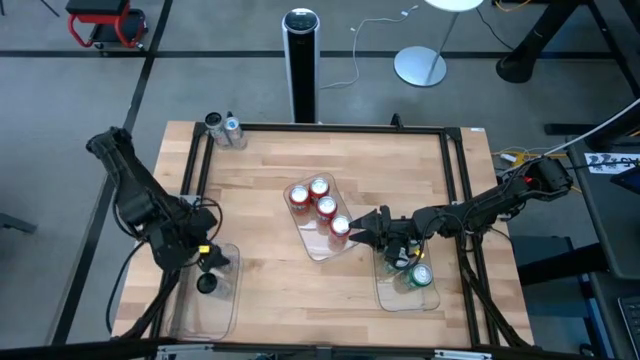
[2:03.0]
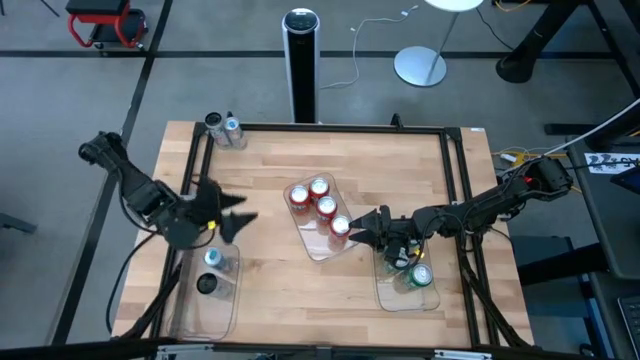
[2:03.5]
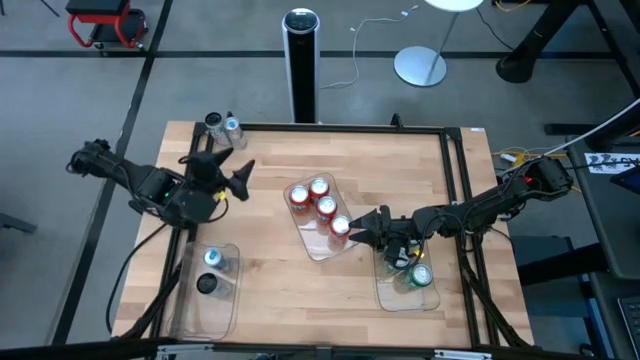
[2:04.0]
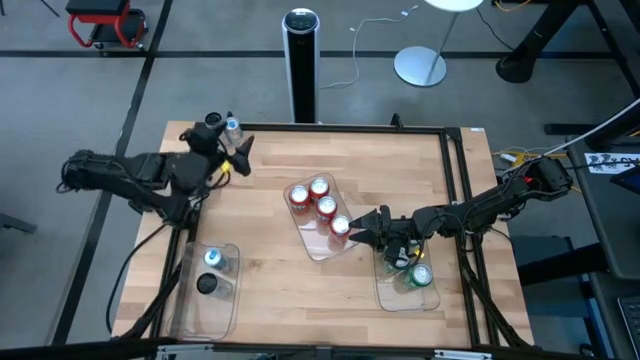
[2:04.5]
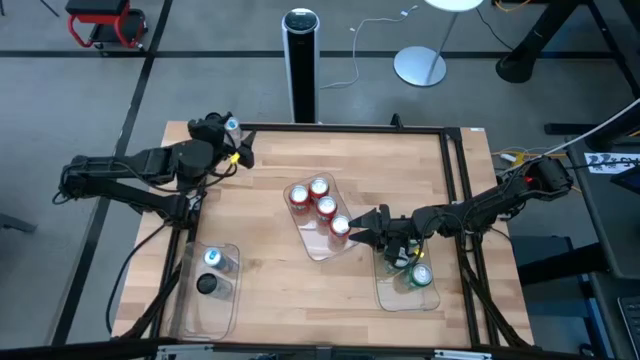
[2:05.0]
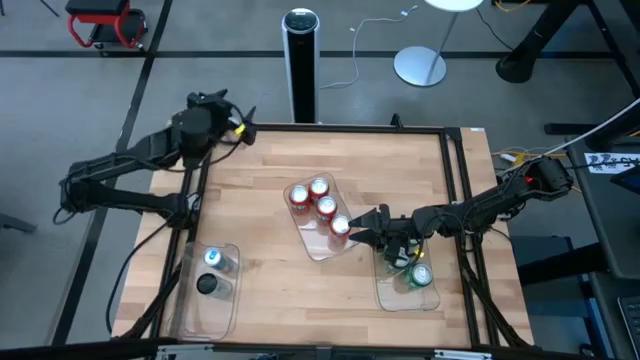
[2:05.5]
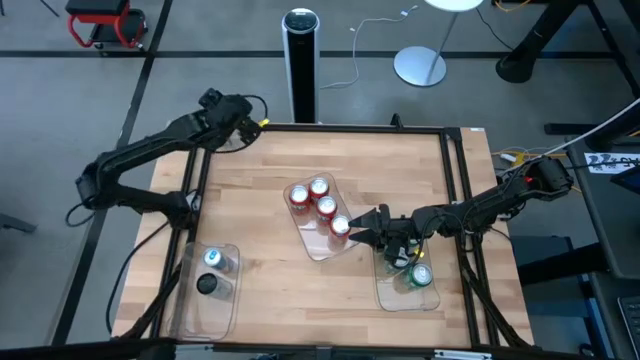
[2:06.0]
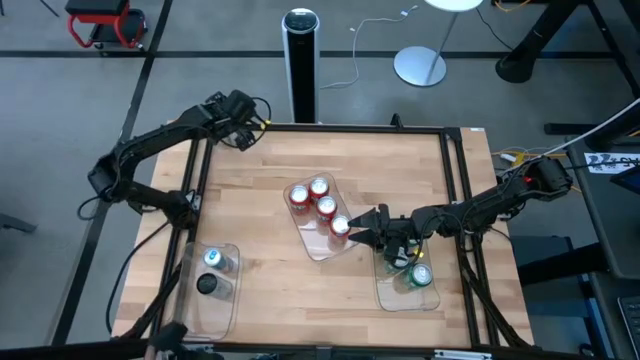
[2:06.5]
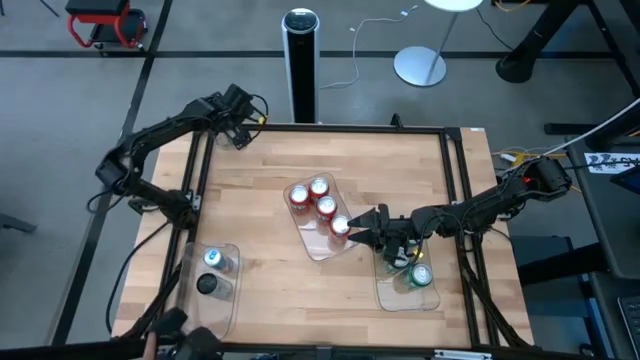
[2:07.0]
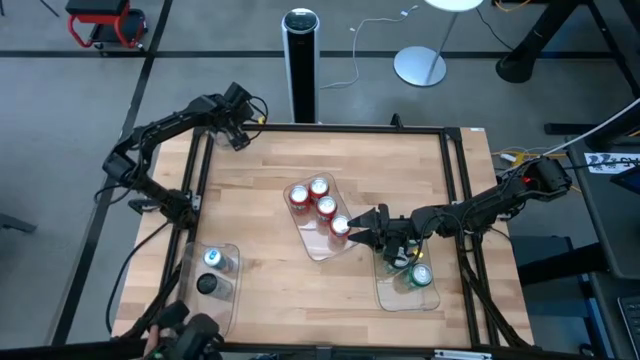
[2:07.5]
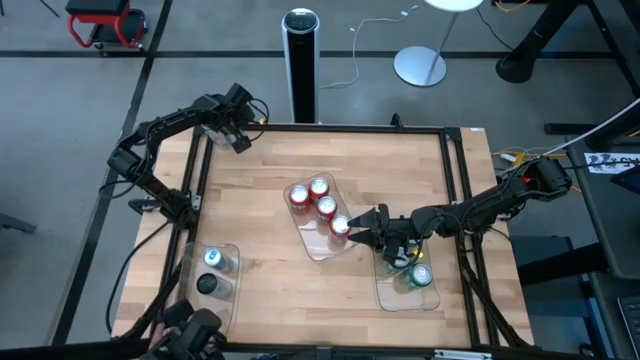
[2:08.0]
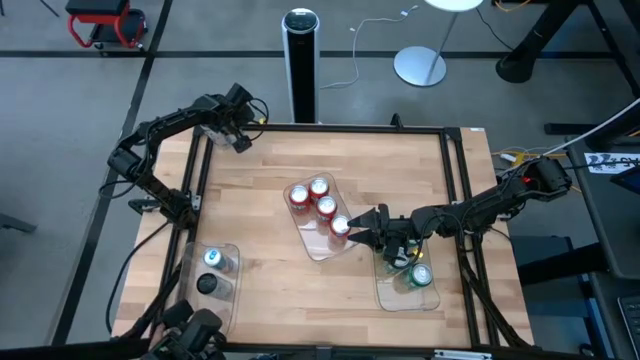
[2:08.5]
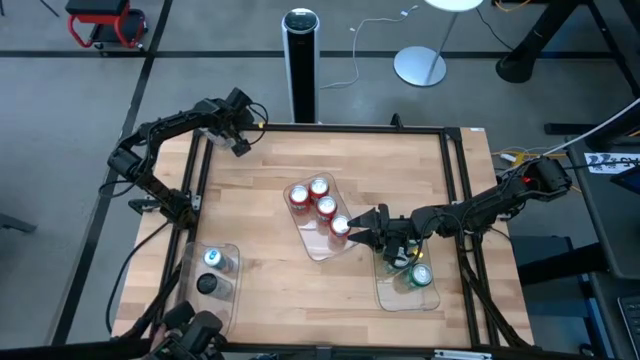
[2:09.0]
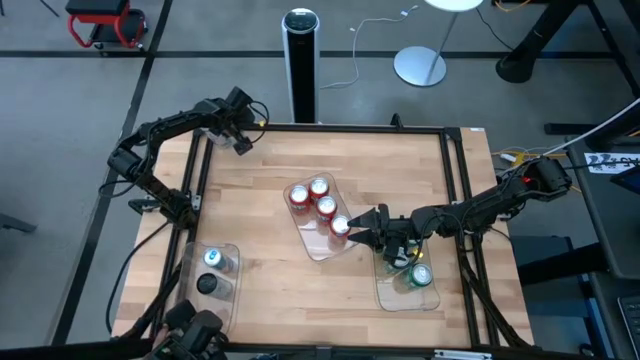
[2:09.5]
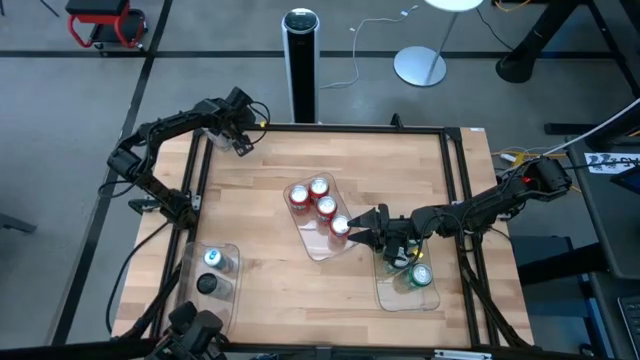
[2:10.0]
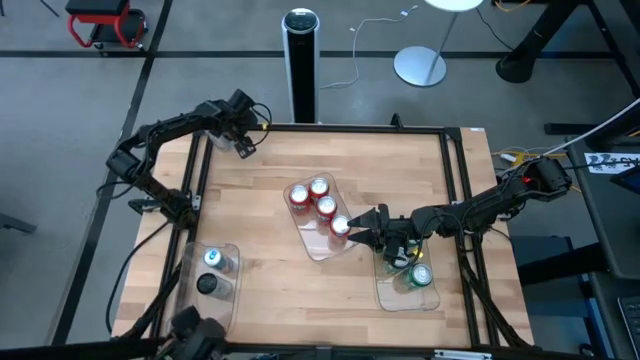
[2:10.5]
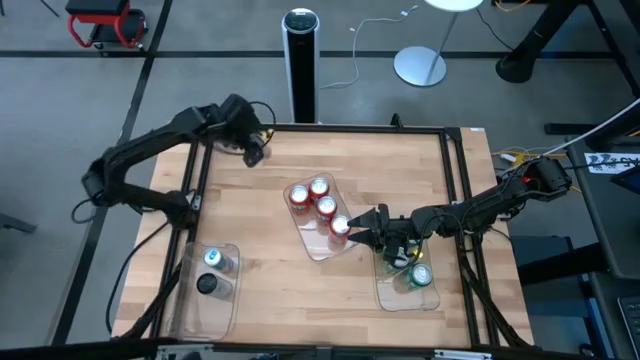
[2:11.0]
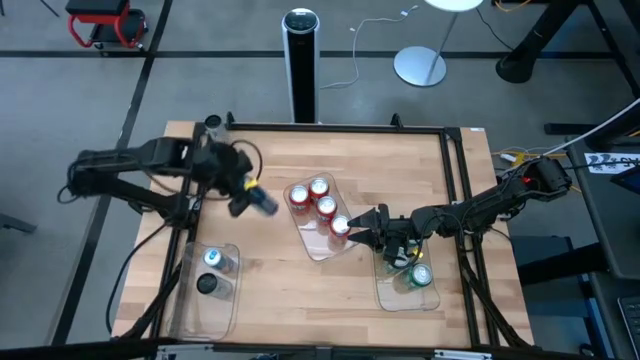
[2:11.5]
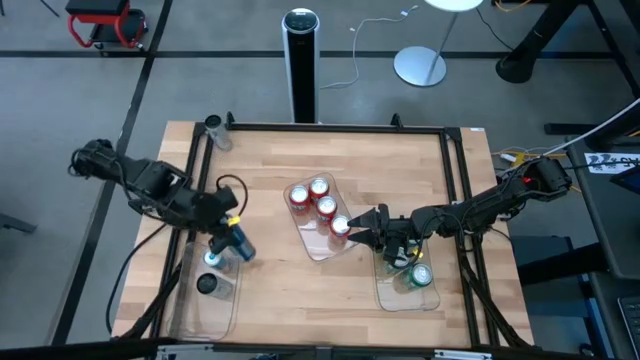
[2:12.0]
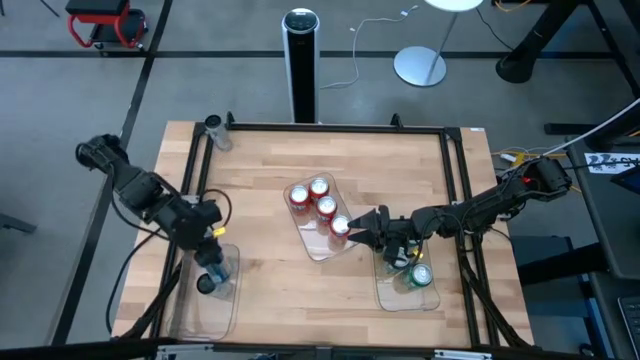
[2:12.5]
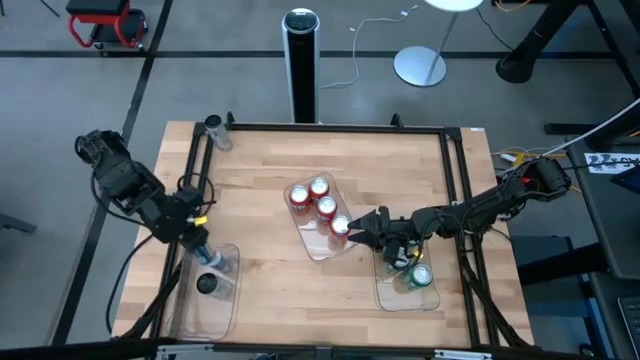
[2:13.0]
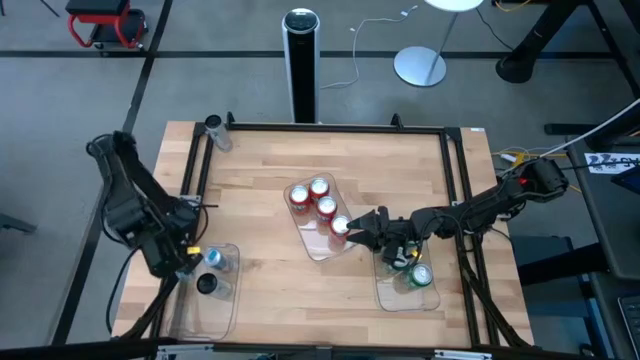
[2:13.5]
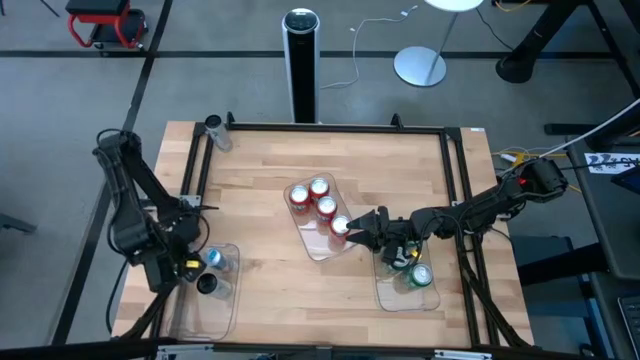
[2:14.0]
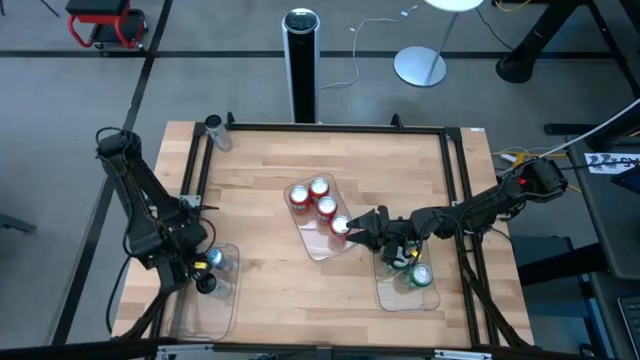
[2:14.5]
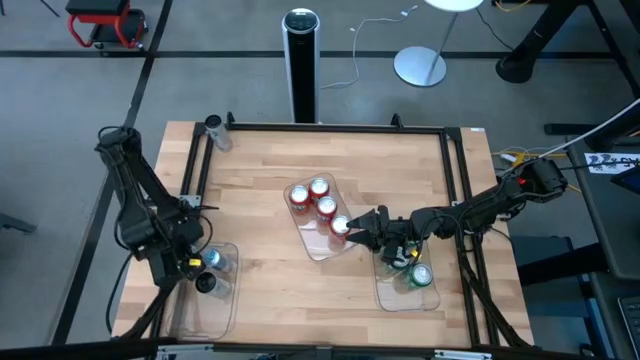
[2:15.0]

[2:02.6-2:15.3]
Task: Sort soda cans
Put the blue soda can into the left transparent bin
